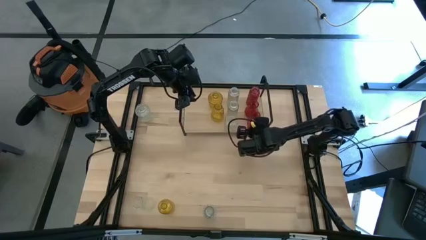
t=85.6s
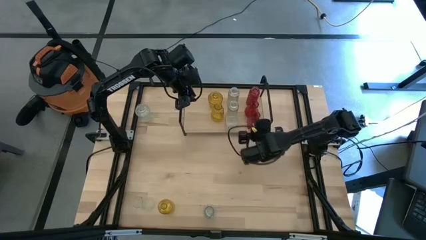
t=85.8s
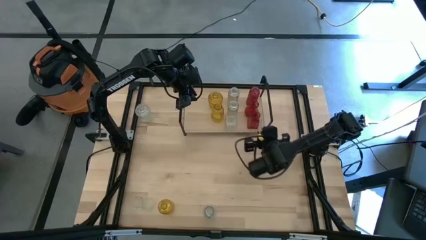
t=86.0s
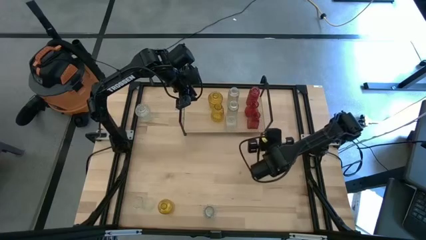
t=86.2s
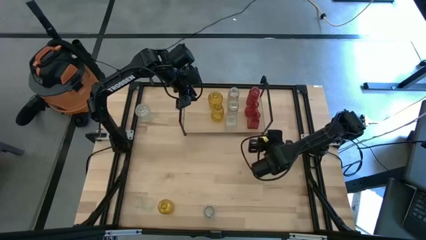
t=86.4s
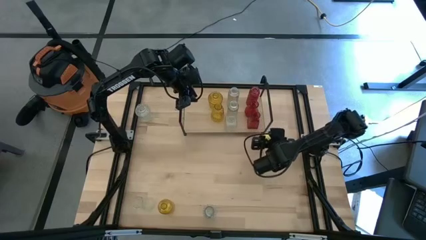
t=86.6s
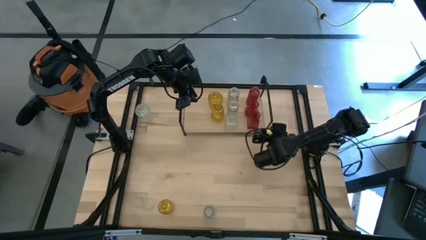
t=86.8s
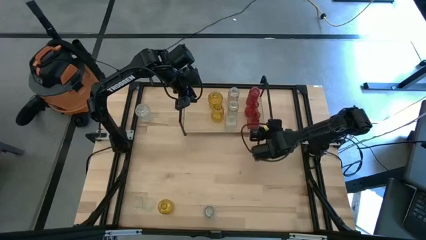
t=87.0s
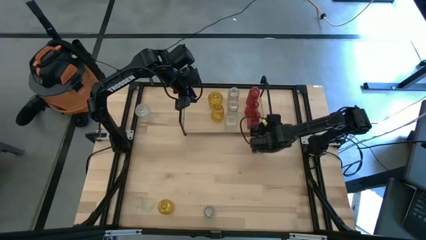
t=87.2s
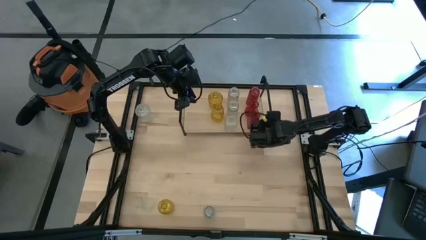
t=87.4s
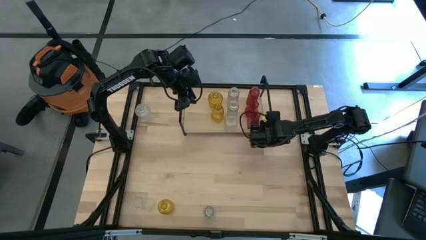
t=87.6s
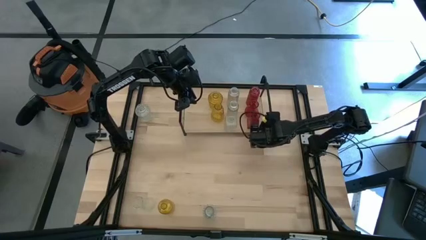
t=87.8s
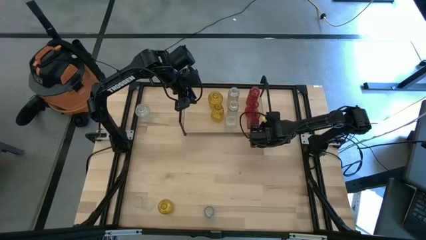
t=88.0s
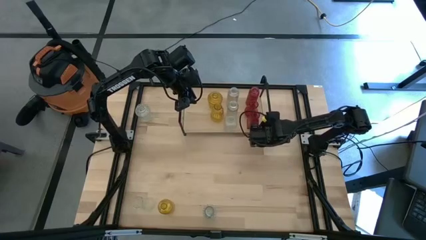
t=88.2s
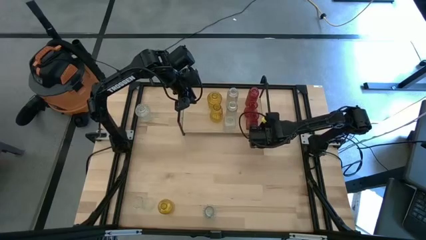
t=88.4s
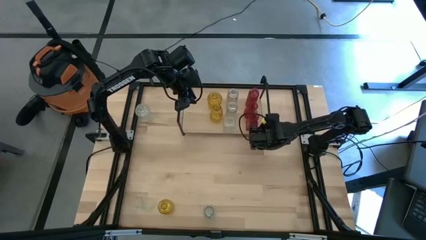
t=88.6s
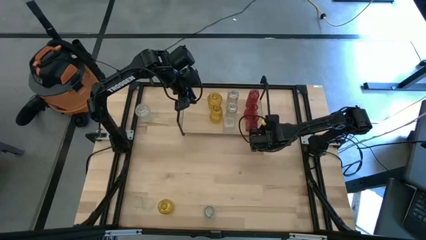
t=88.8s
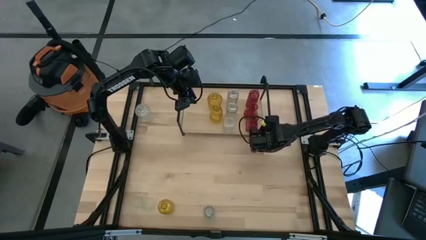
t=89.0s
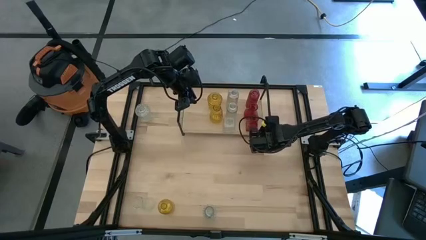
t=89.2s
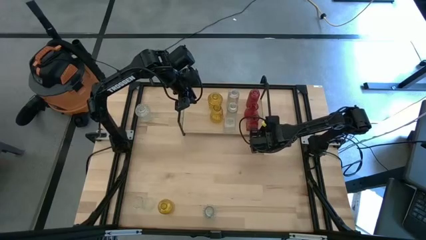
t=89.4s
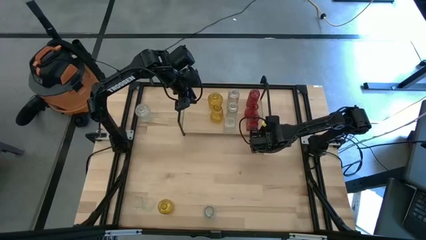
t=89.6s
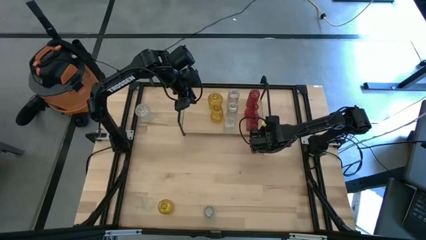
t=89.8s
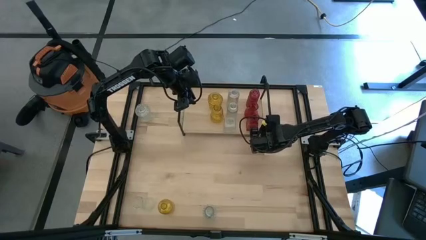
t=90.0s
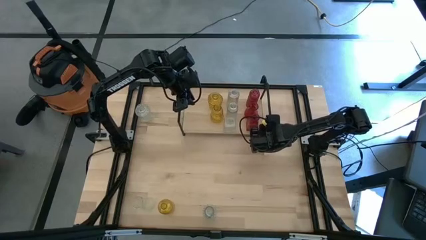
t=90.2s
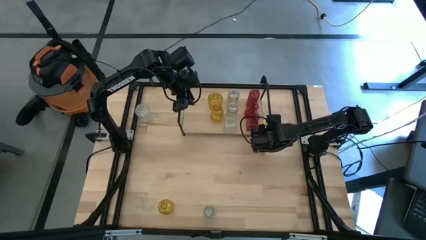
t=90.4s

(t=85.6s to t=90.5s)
Task: sort vases onto shelf
Adjust the shelf

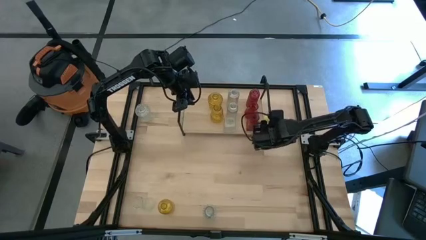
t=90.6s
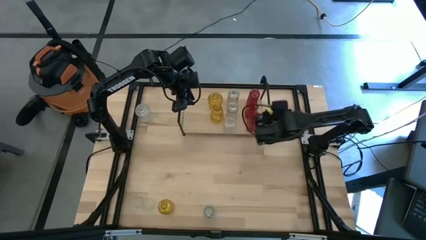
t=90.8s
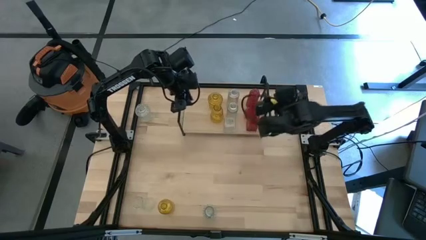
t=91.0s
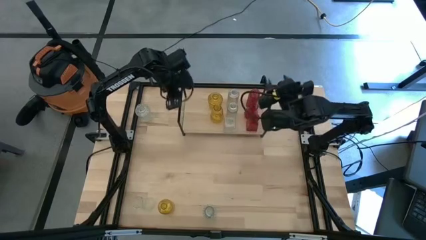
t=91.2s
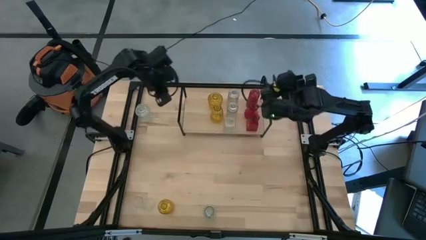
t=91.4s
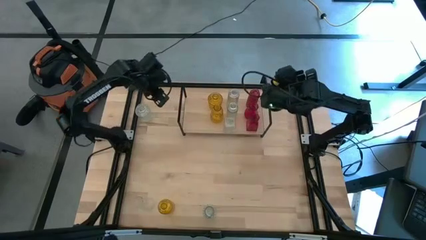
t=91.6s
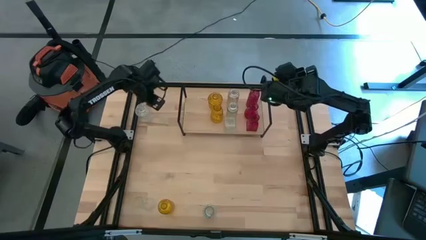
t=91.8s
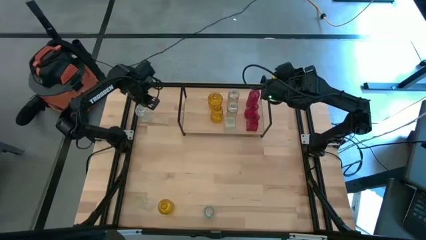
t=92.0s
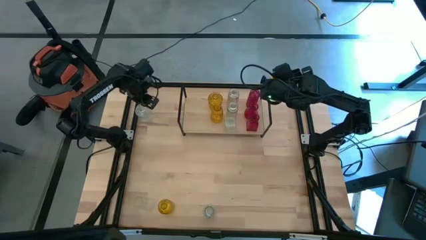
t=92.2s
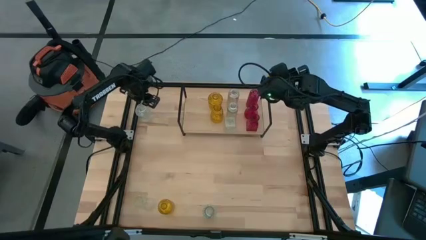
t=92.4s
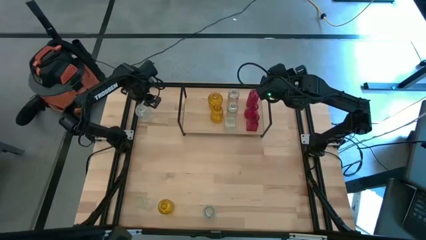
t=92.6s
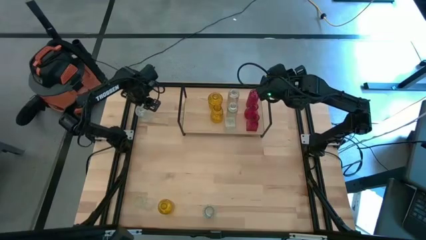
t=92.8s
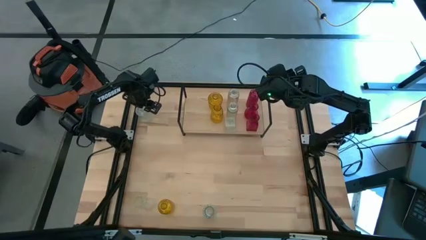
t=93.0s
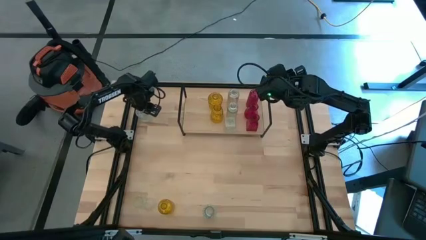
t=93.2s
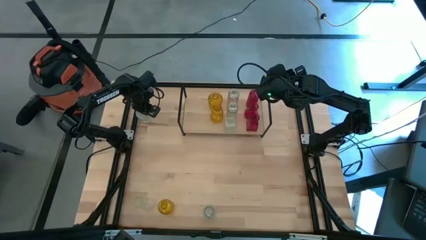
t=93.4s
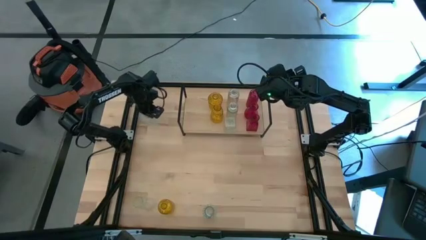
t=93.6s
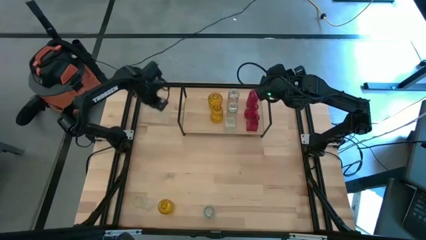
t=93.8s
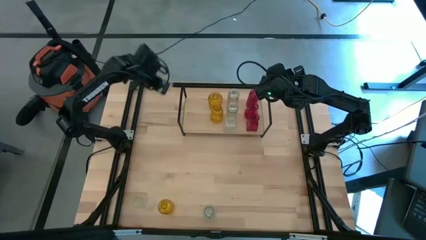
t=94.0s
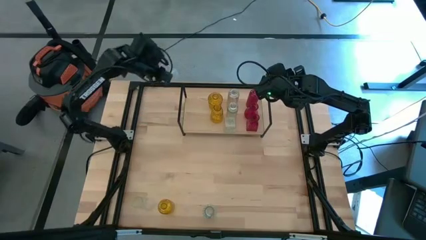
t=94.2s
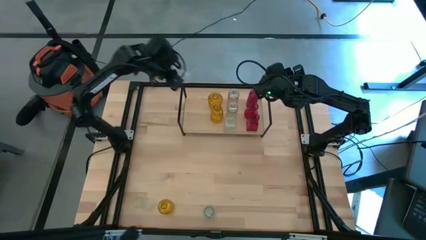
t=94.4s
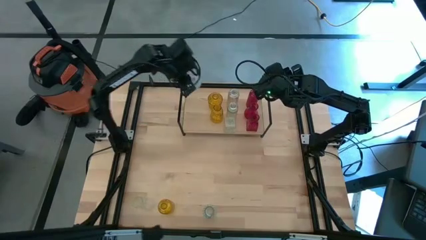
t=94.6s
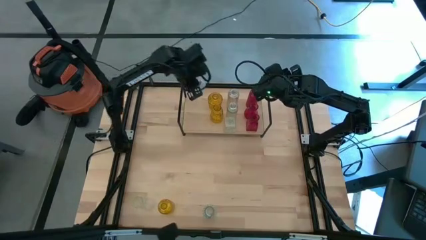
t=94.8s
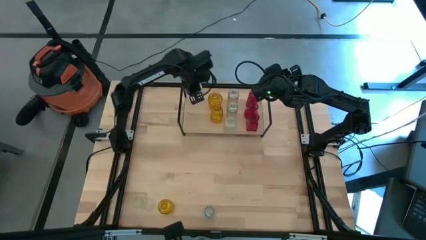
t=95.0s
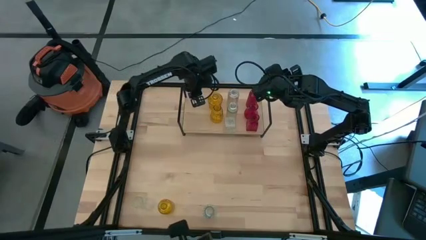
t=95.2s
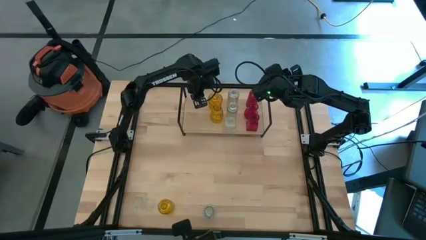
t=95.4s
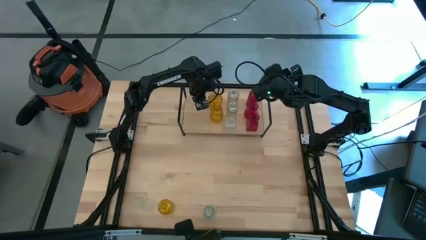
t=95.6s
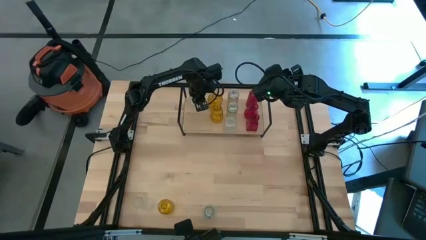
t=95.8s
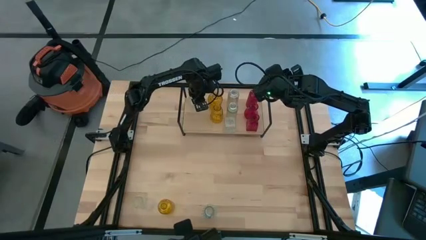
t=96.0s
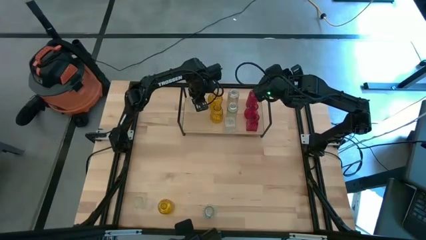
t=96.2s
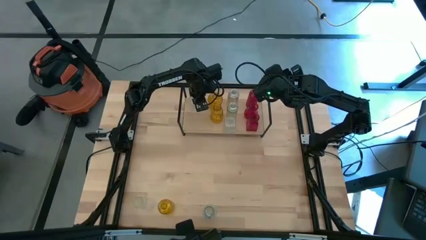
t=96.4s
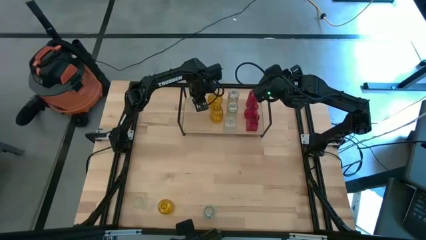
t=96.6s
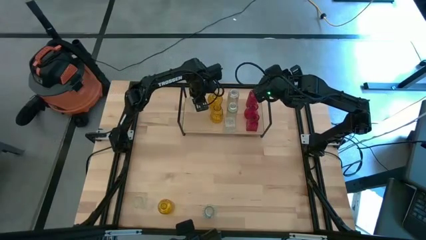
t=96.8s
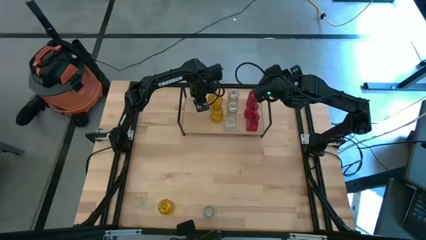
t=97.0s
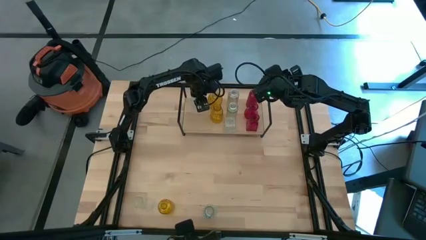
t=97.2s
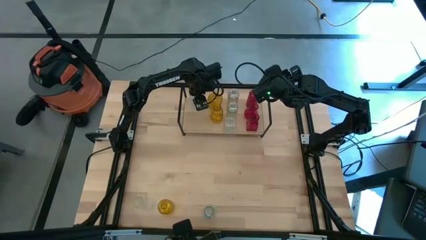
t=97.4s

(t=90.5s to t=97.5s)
Put the transparent vase on the shelf

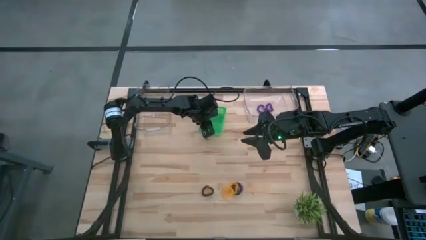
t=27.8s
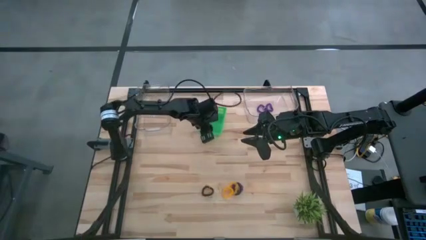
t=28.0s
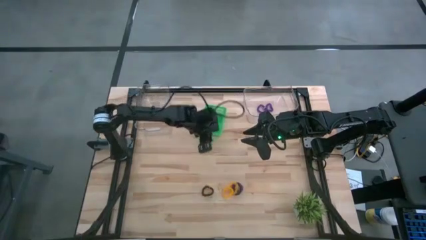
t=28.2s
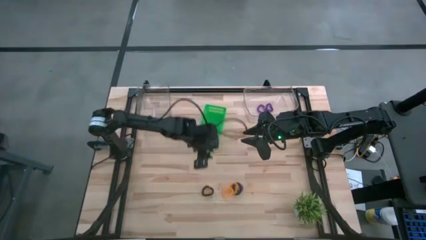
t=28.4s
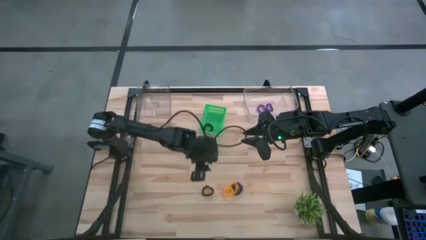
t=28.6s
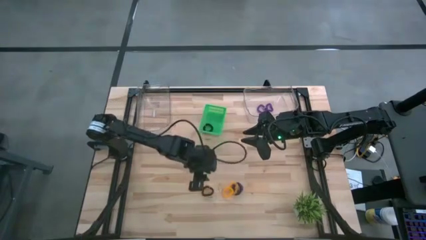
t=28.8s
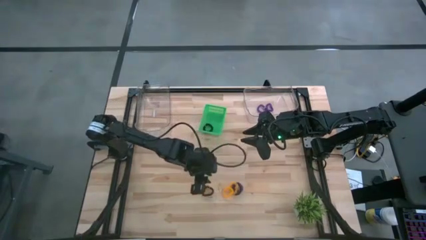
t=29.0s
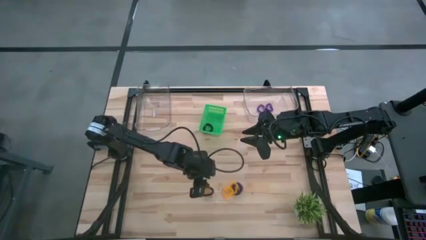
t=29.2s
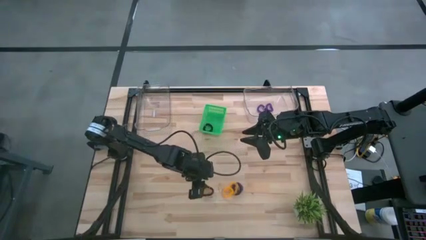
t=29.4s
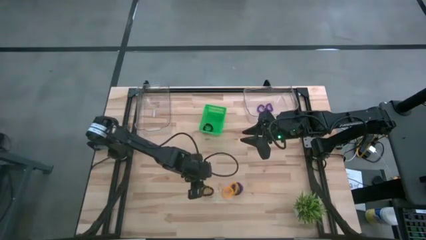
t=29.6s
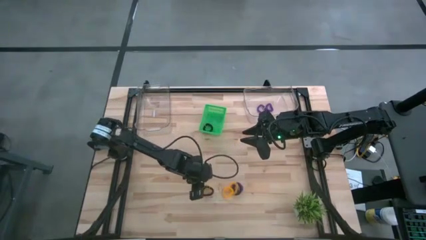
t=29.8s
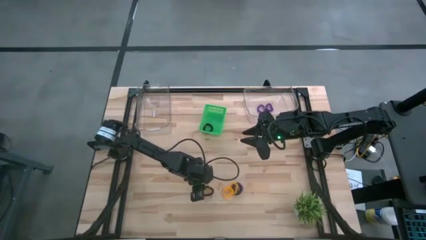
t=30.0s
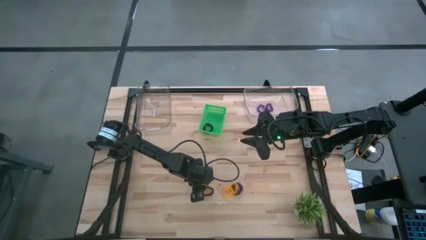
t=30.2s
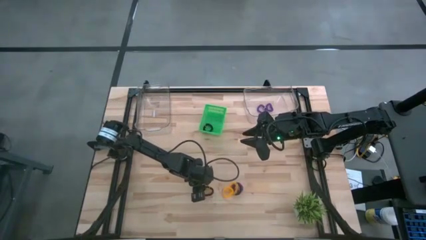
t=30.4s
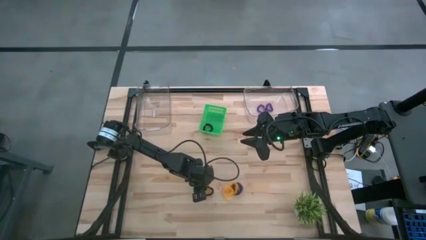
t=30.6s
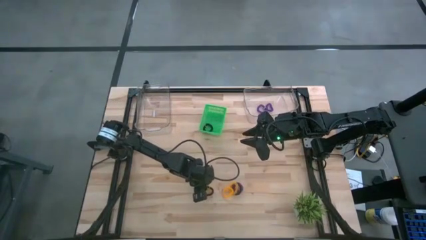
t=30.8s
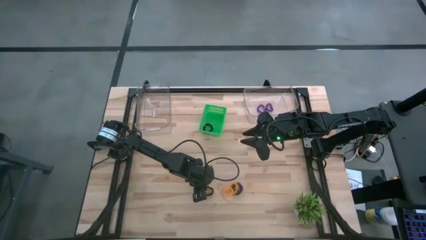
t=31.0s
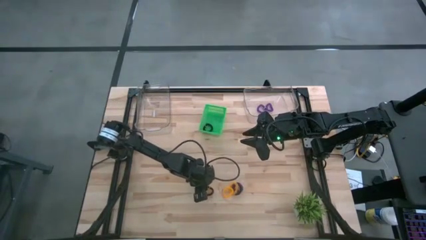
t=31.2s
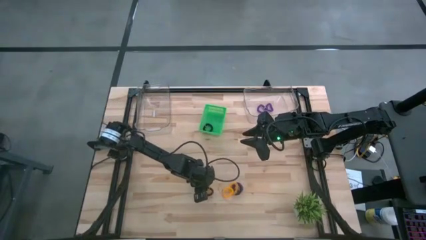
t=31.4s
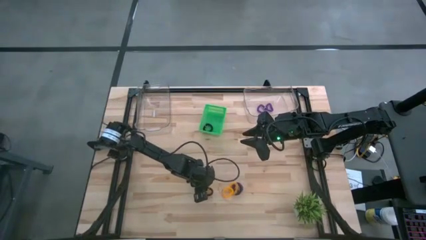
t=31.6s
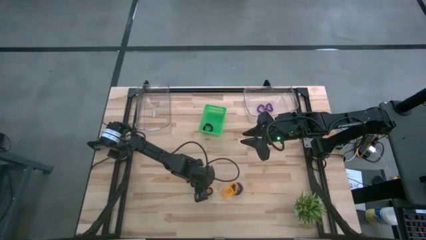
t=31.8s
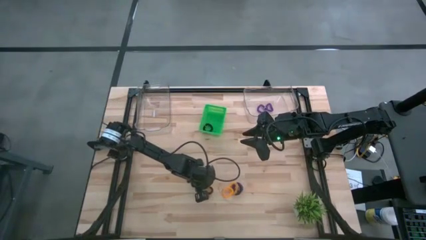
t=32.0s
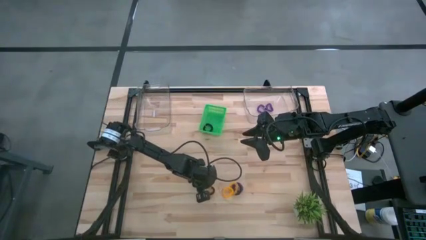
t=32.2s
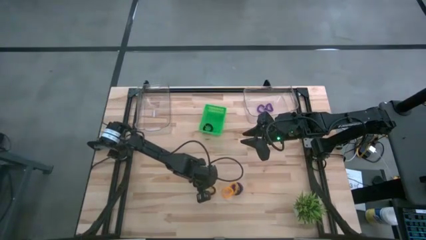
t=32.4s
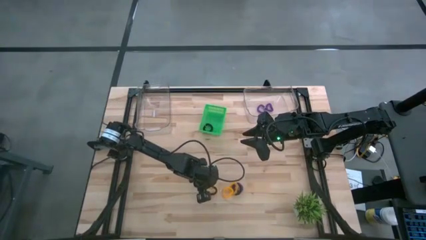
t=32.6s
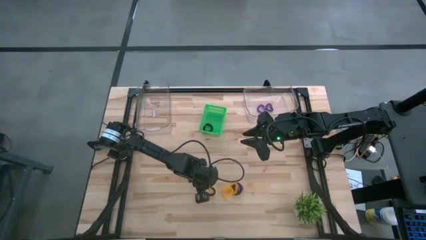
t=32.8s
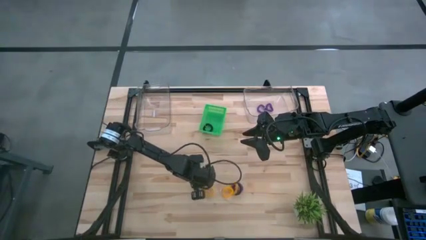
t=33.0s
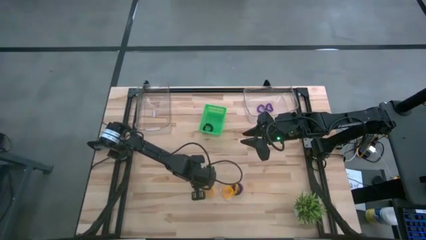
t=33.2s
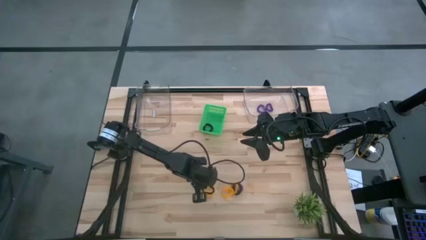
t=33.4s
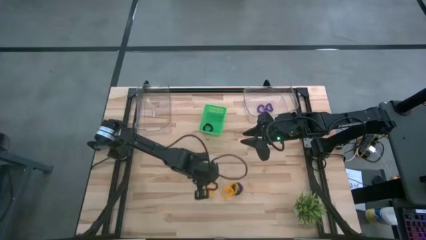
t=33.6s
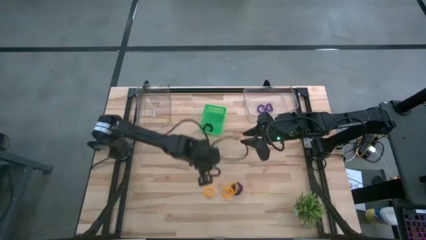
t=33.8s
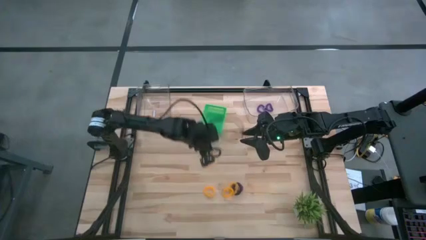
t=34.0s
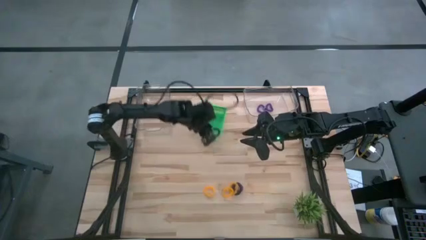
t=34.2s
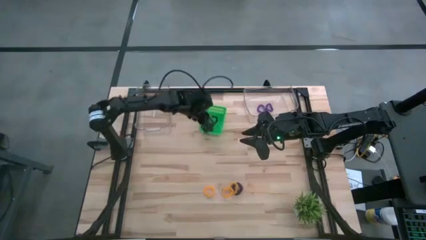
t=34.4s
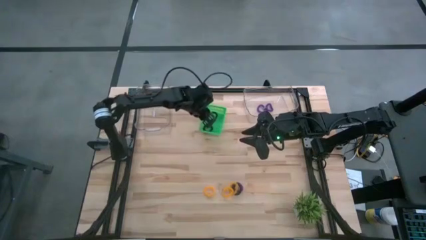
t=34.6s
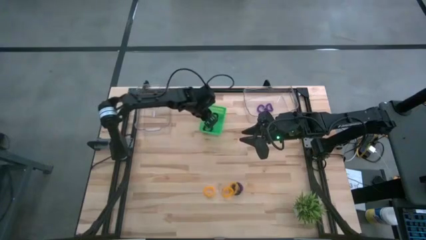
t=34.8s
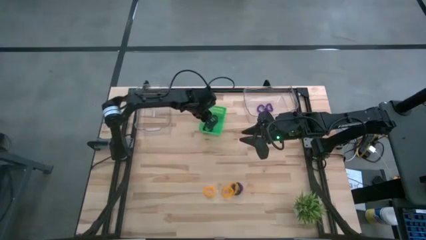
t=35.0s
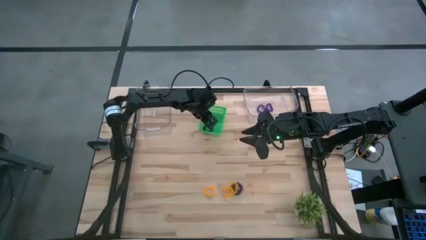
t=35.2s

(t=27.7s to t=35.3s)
Task: Sort spring keychains
Put the black spring keychain into the green bin
